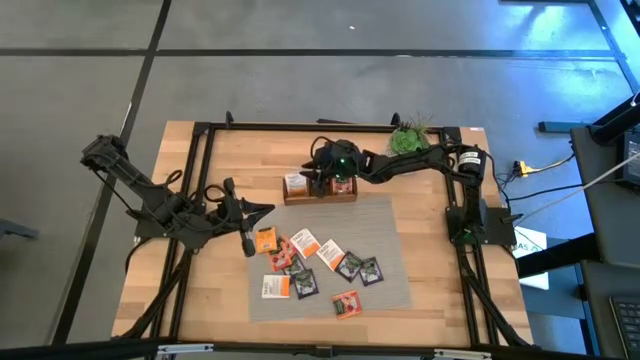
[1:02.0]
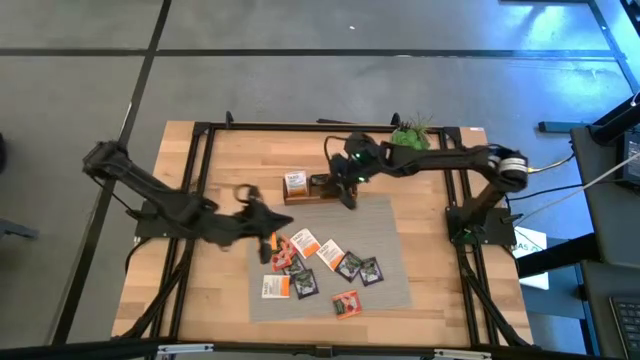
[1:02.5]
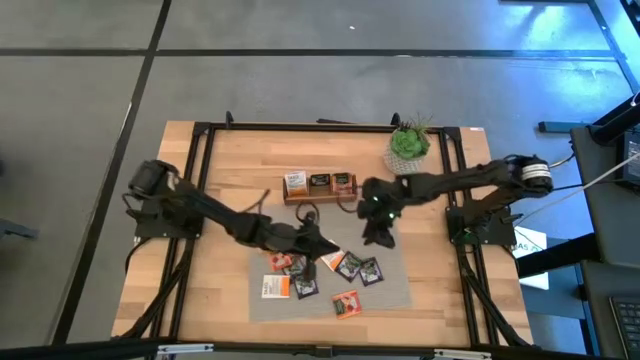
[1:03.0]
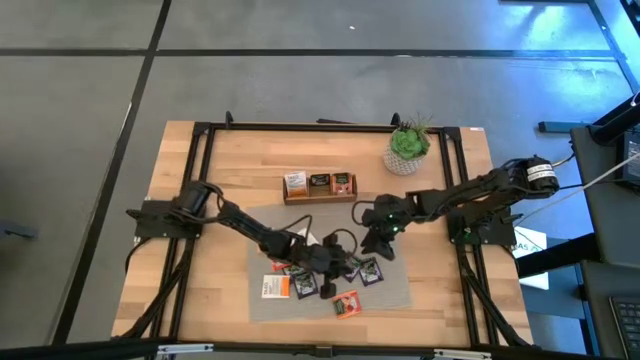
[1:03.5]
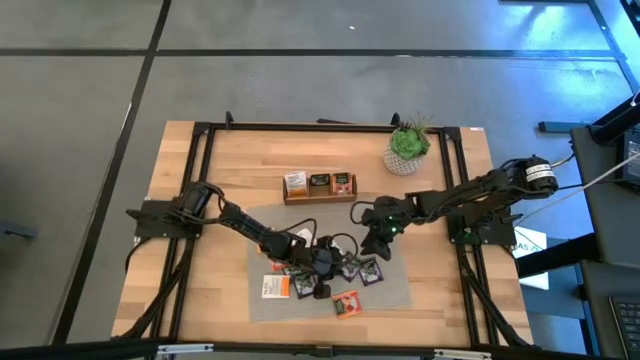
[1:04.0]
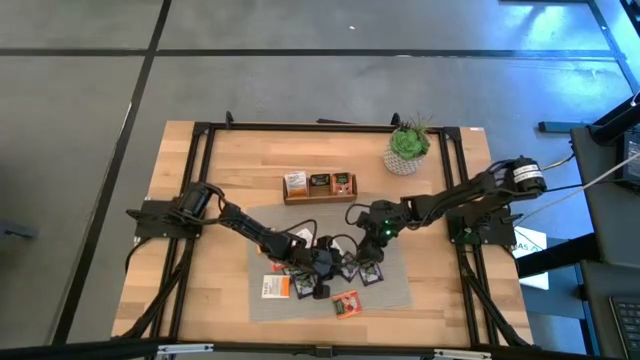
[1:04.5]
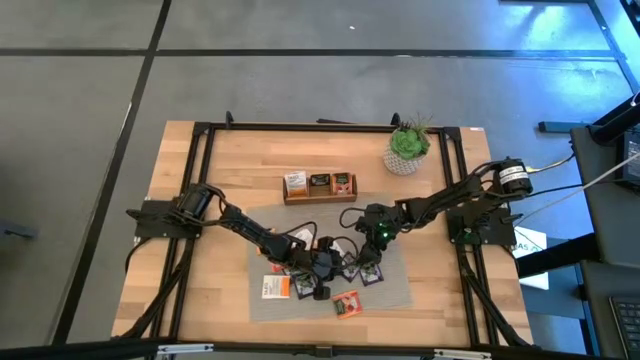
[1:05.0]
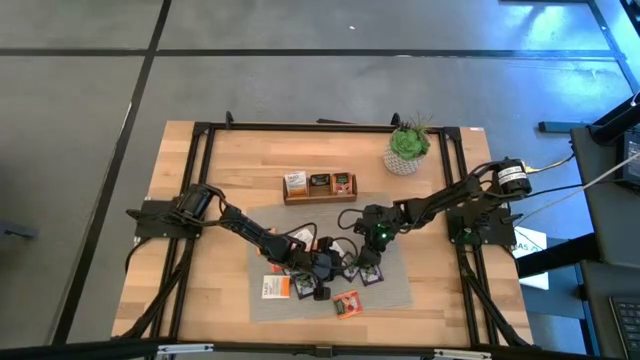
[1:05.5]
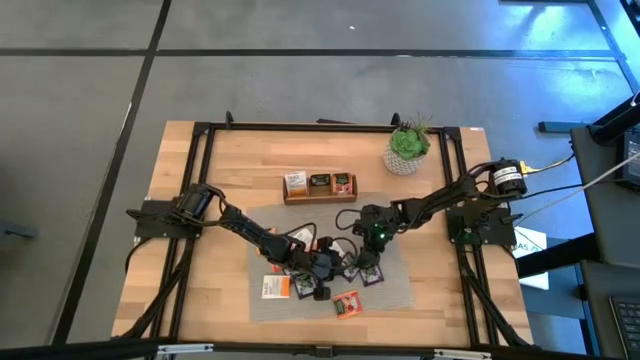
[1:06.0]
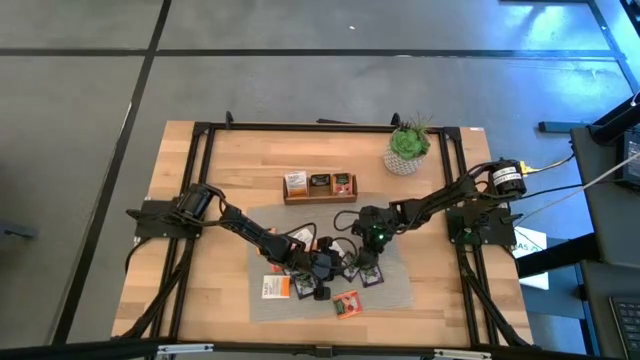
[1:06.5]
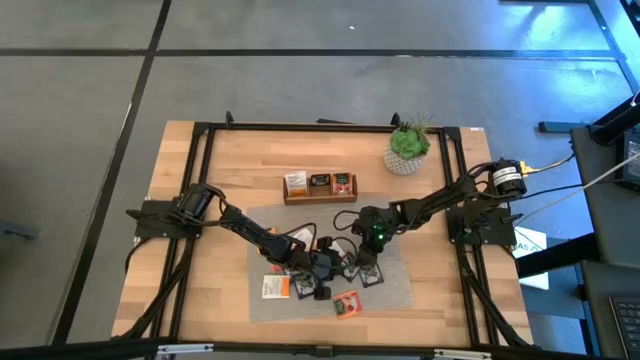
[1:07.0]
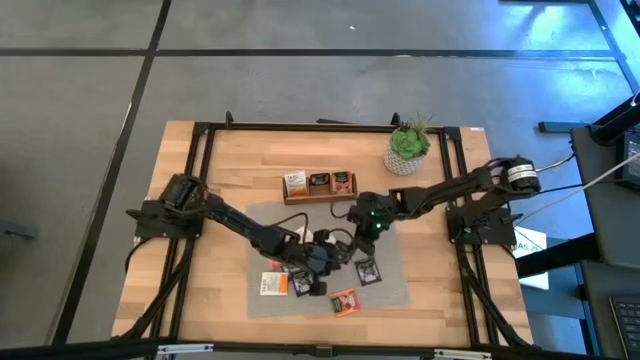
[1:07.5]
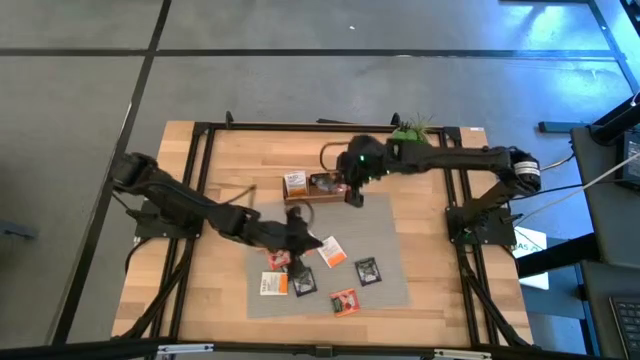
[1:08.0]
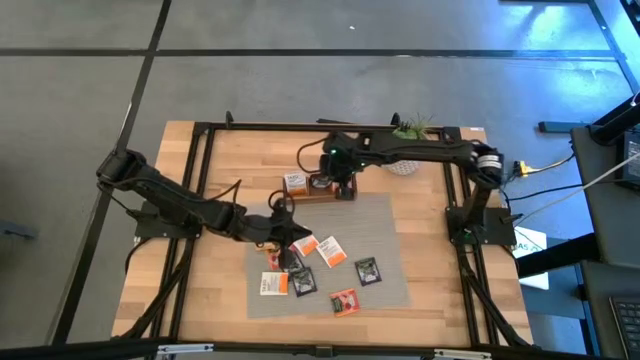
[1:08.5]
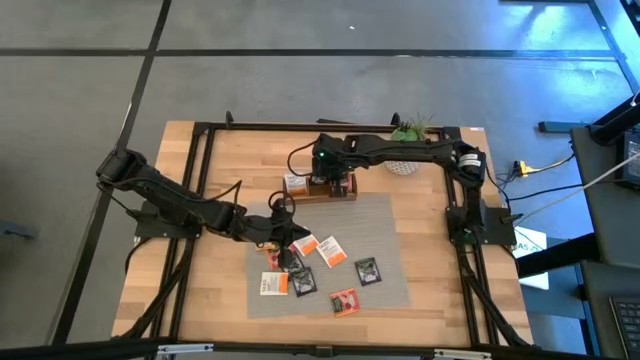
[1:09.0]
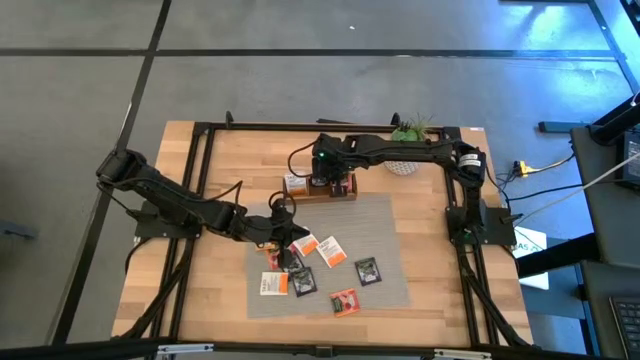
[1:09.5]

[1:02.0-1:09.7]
Task: Pick & Place Tea
Put the blue tea bag into the middle section of the wooden organizer

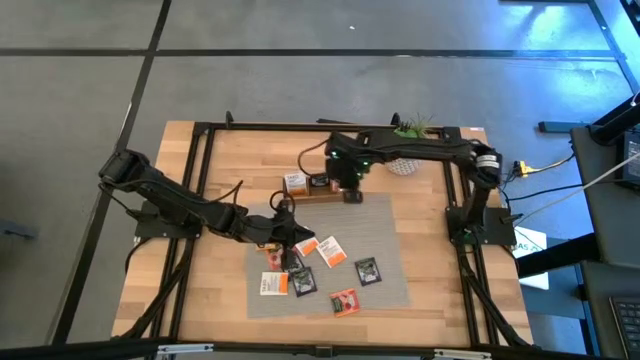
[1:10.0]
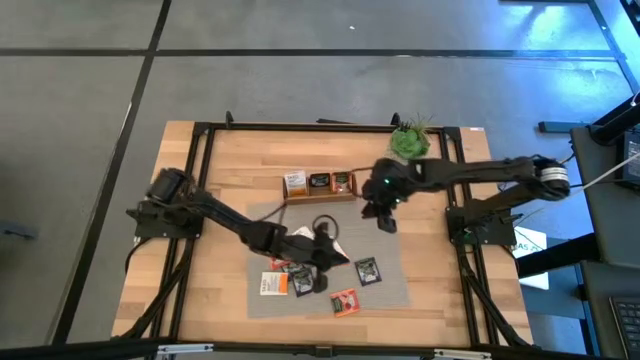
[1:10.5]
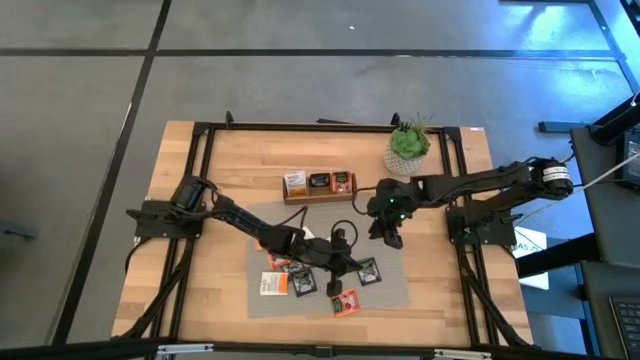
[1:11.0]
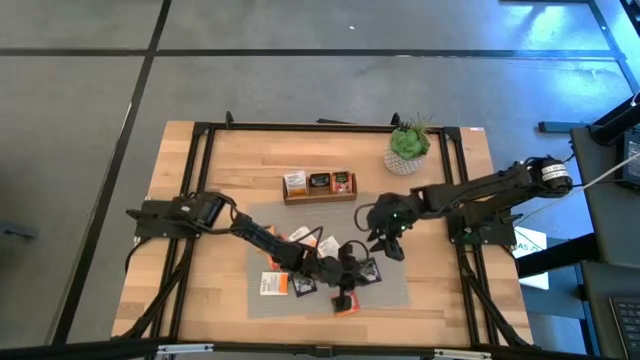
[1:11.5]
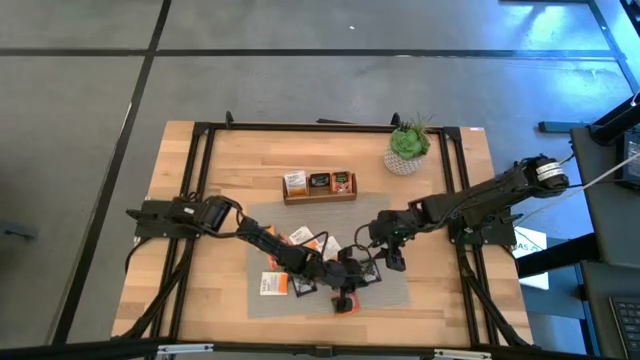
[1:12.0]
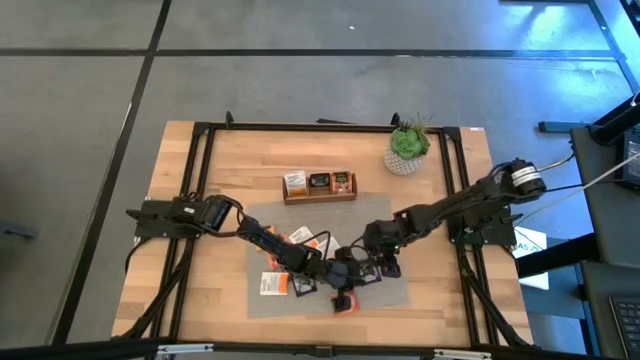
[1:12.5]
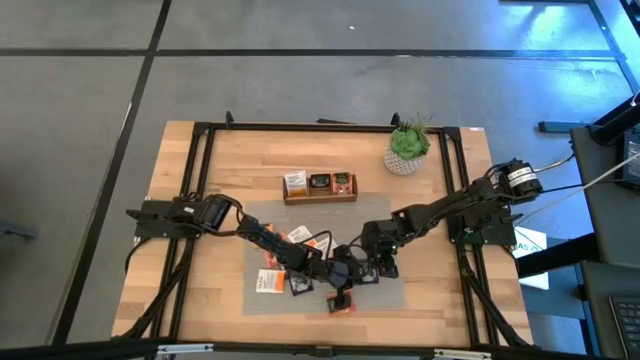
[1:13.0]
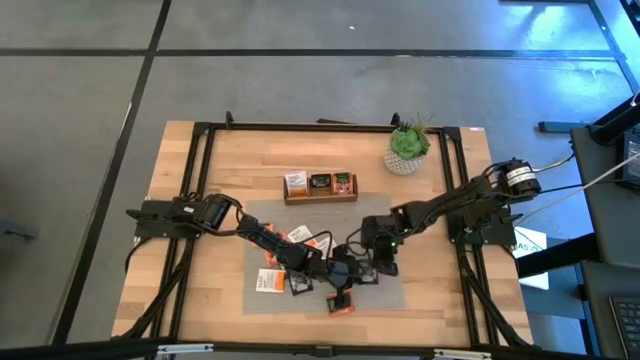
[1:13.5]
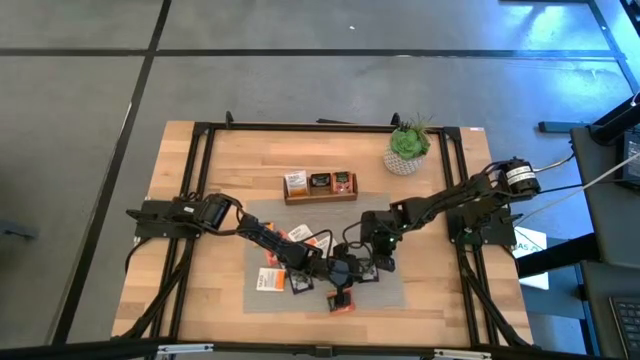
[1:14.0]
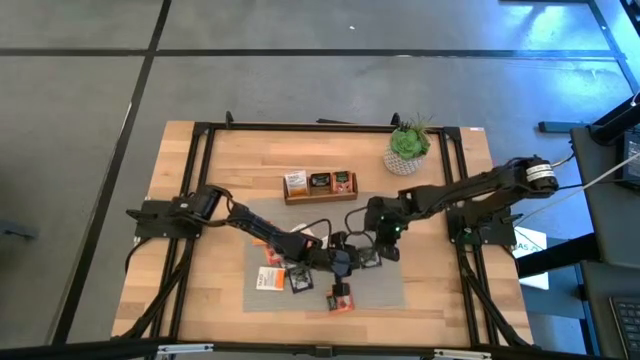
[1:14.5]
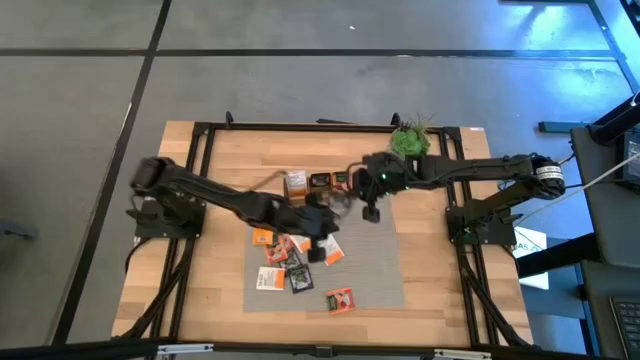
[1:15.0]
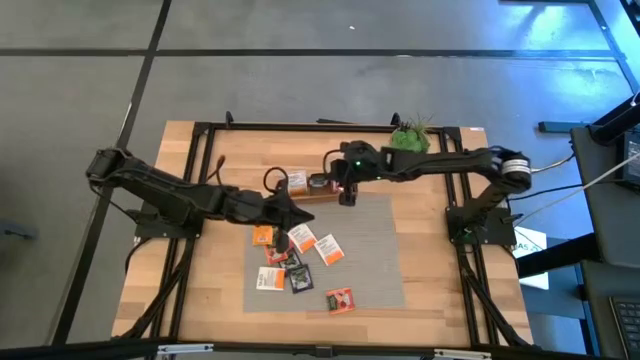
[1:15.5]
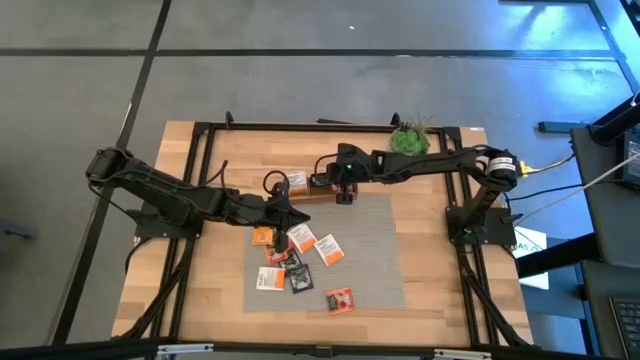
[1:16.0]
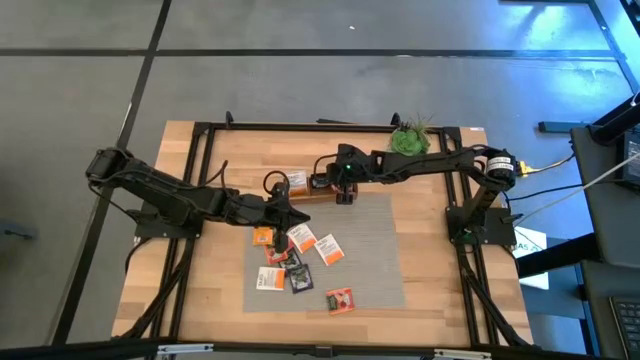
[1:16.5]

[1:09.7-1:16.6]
Put the blue tea bag into the middle section of the wooden organizer

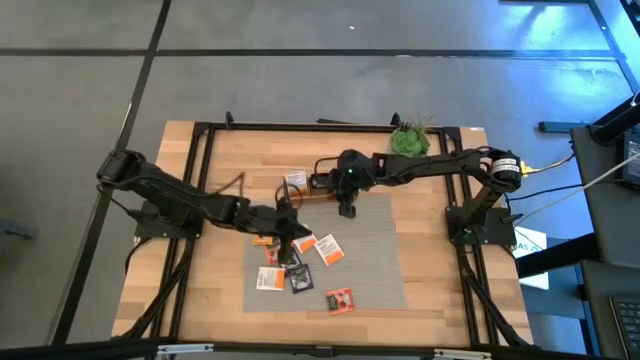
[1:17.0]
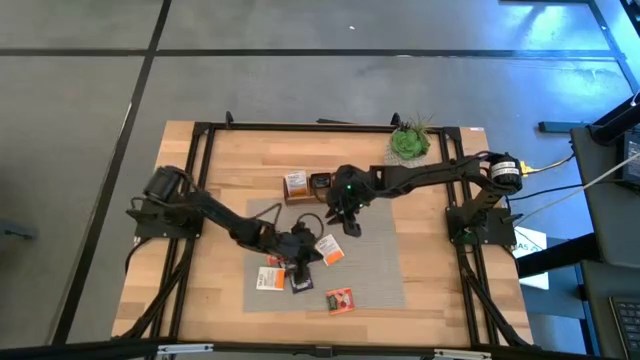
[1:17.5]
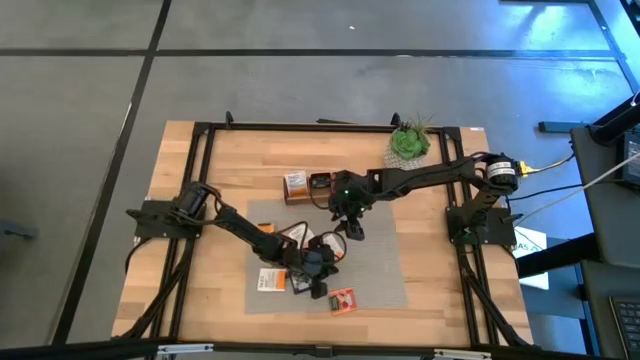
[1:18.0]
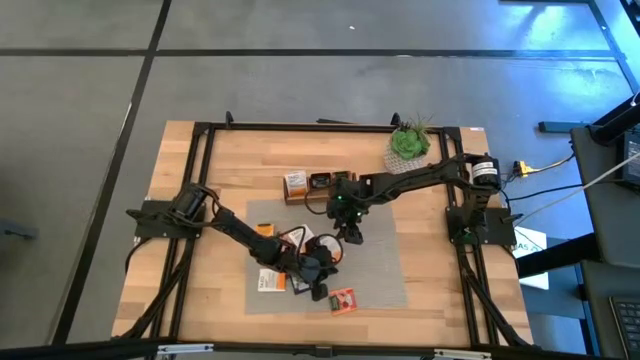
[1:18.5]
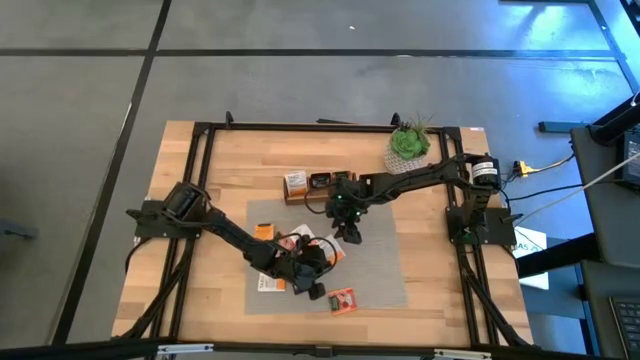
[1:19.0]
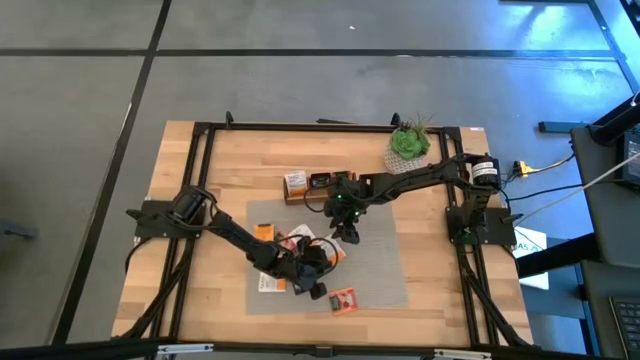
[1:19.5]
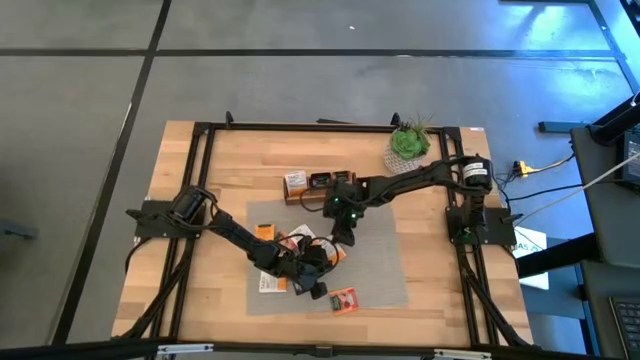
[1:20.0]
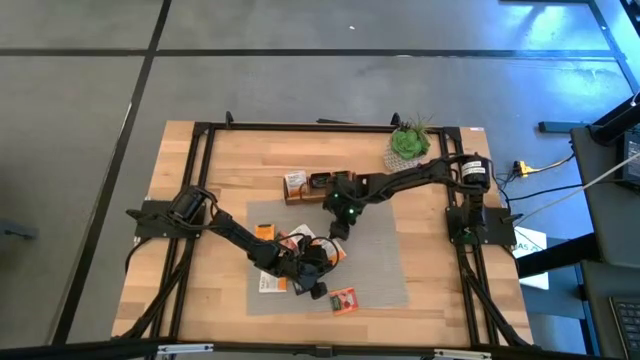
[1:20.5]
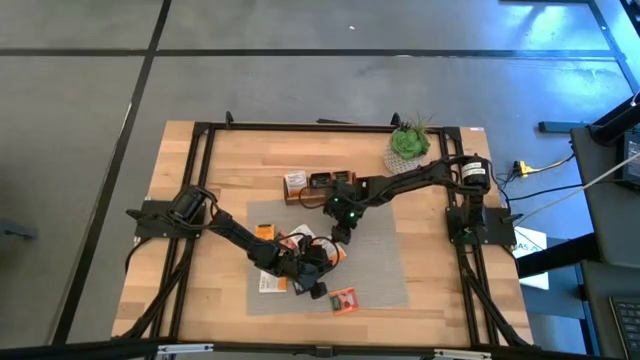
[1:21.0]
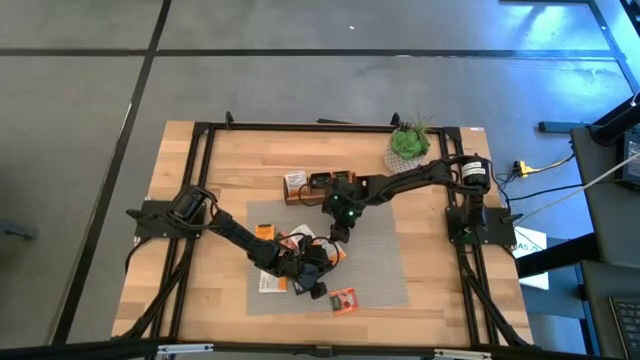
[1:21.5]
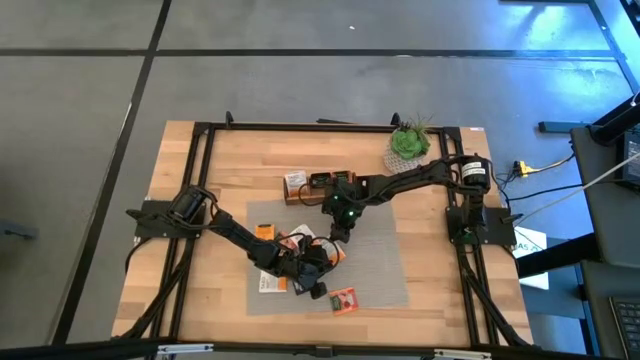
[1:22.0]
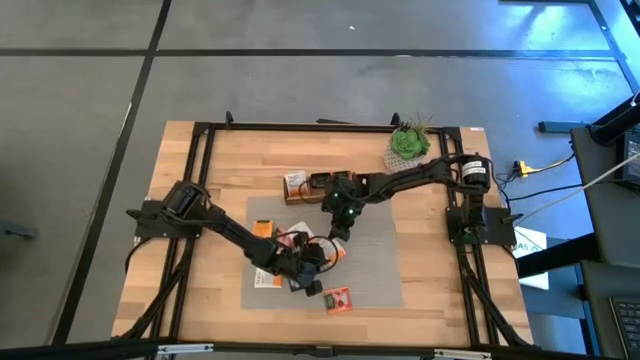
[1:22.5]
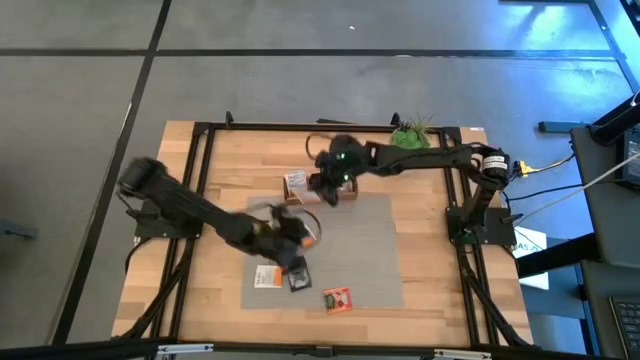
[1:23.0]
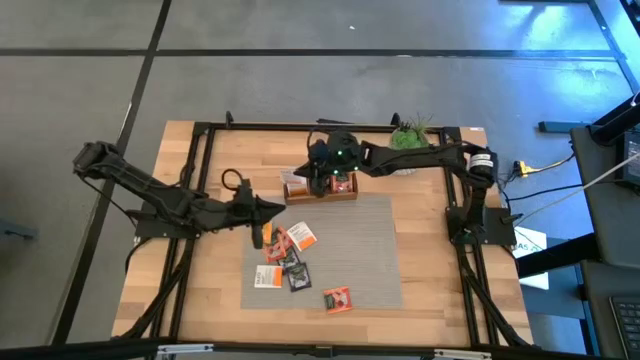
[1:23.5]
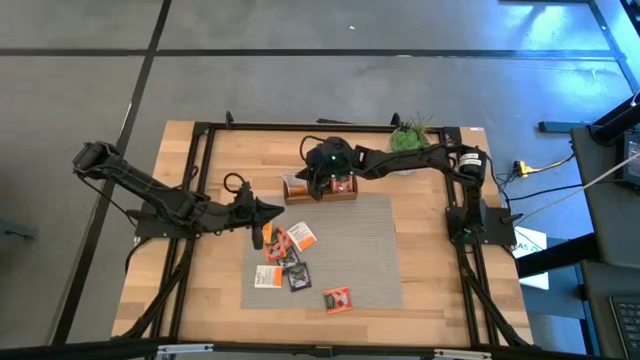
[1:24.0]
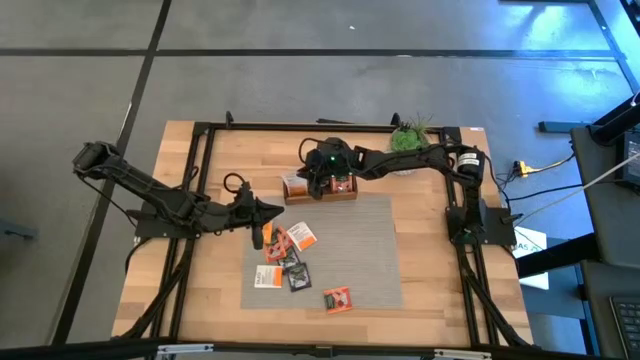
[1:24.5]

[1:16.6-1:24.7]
Put the white tea bag into the left section of the wooden organizer

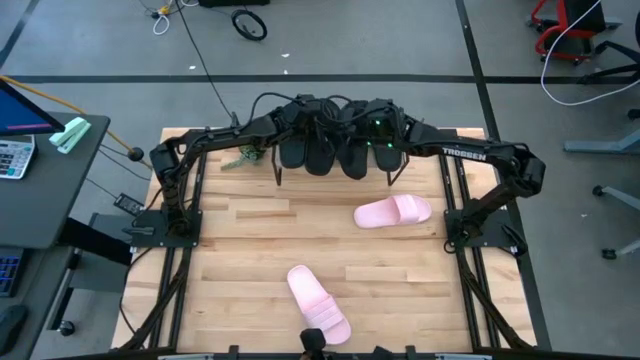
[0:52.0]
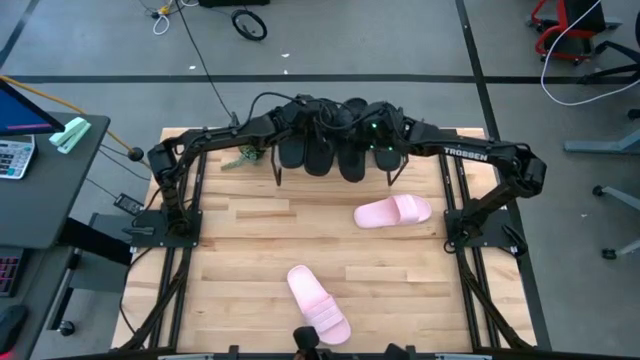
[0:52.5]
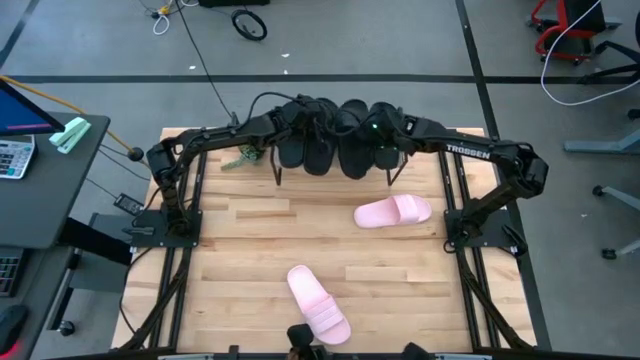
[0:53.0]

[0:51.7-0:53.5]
Task: Pick and place slides into the shelf
Put the black slide on the shelf
